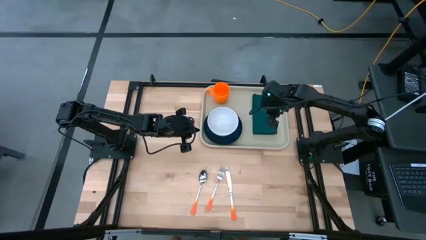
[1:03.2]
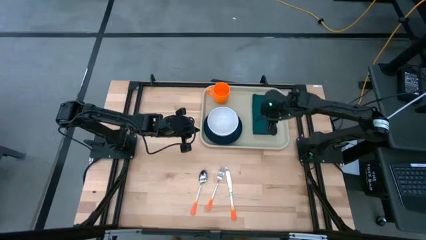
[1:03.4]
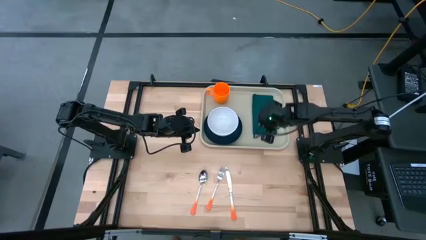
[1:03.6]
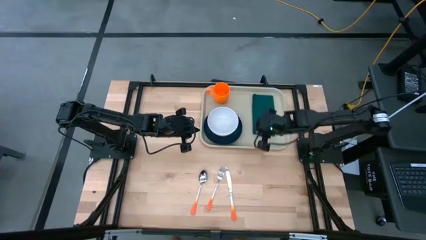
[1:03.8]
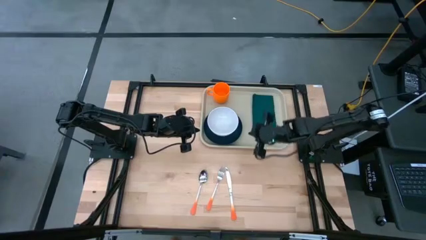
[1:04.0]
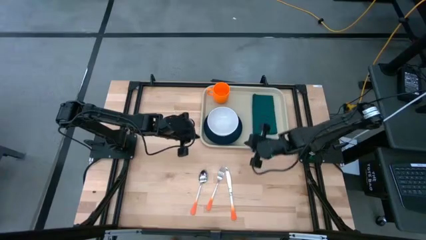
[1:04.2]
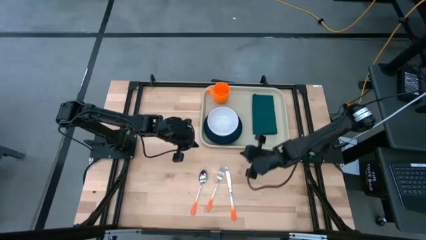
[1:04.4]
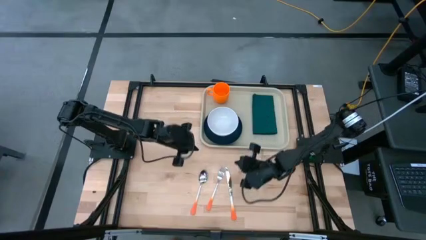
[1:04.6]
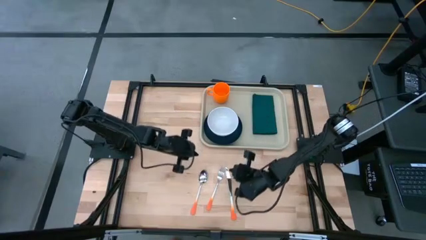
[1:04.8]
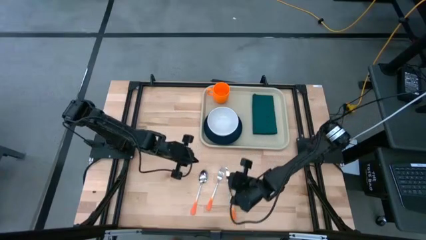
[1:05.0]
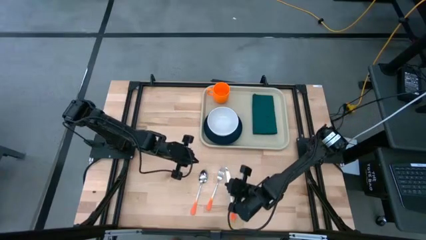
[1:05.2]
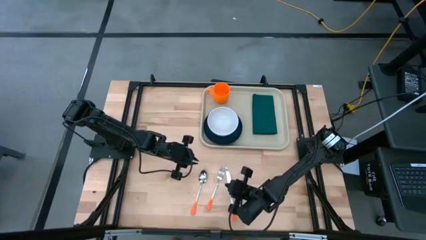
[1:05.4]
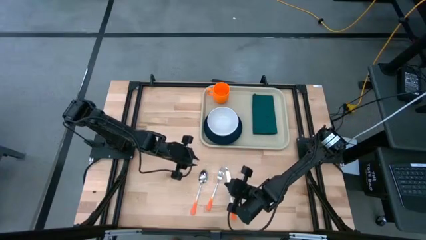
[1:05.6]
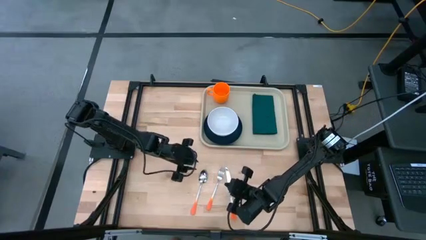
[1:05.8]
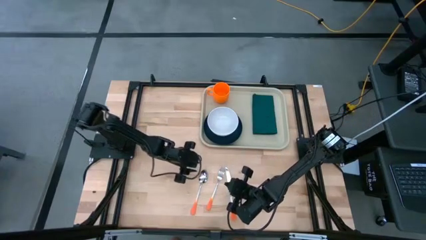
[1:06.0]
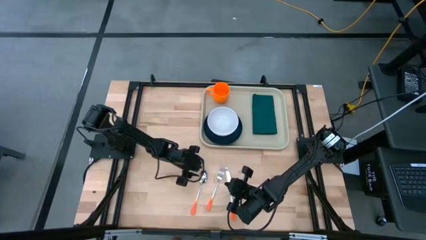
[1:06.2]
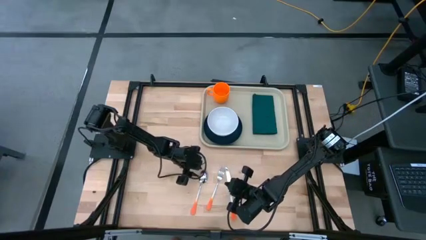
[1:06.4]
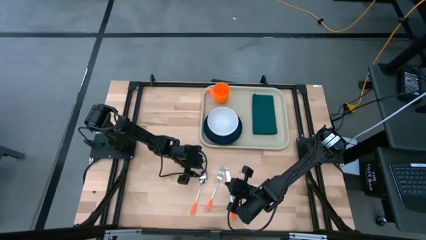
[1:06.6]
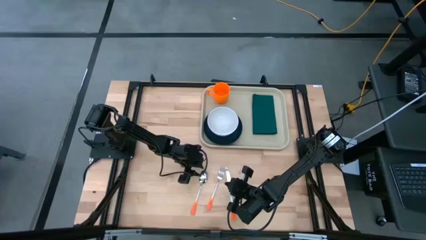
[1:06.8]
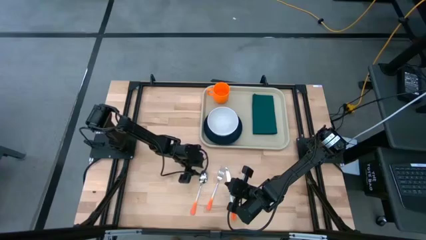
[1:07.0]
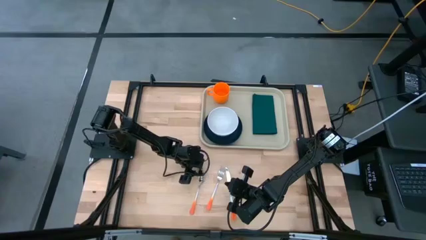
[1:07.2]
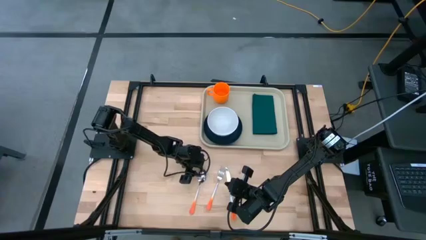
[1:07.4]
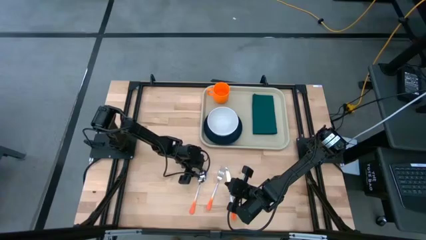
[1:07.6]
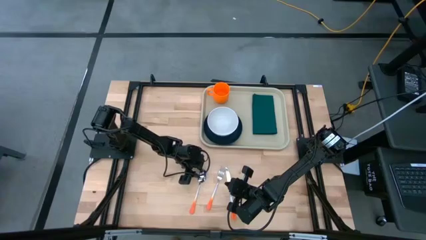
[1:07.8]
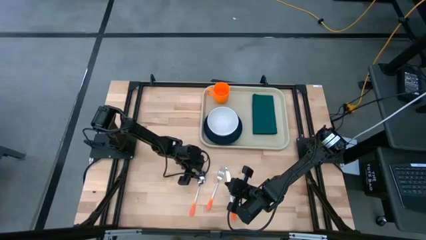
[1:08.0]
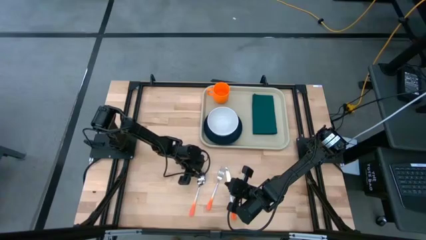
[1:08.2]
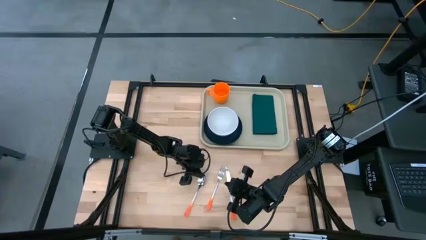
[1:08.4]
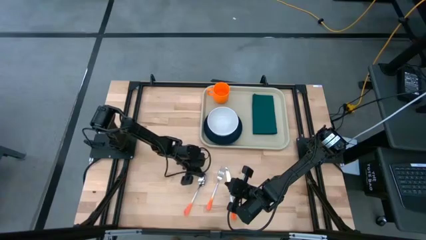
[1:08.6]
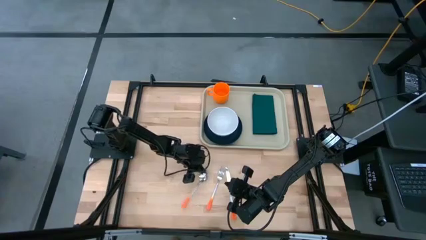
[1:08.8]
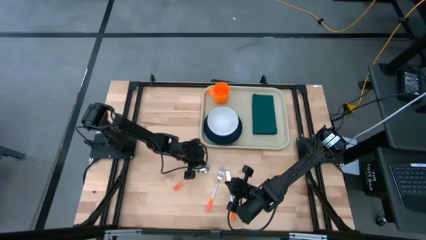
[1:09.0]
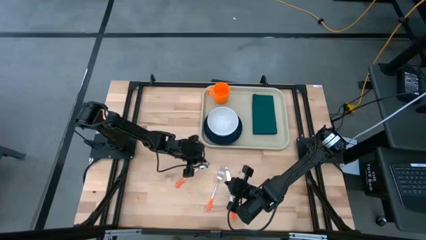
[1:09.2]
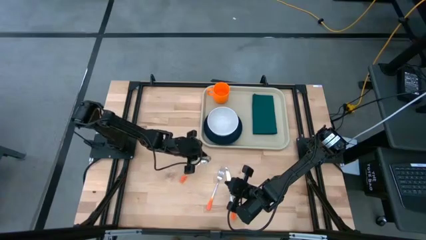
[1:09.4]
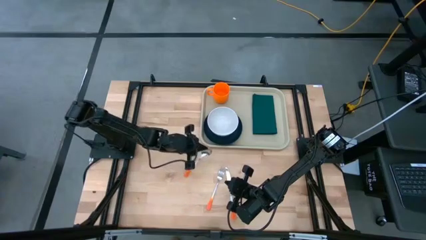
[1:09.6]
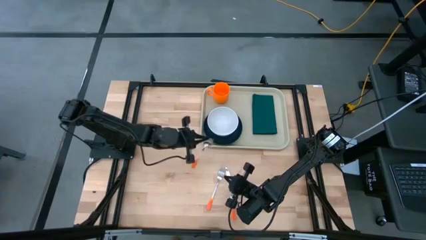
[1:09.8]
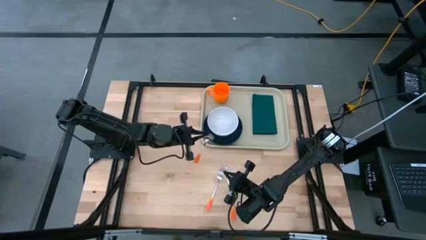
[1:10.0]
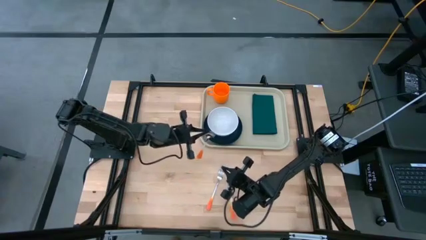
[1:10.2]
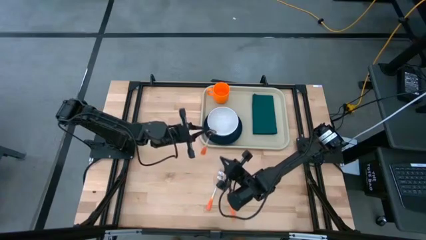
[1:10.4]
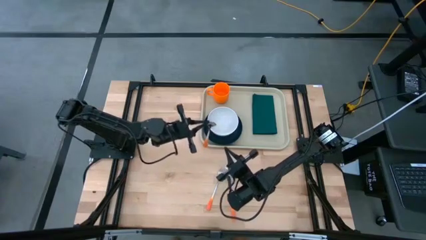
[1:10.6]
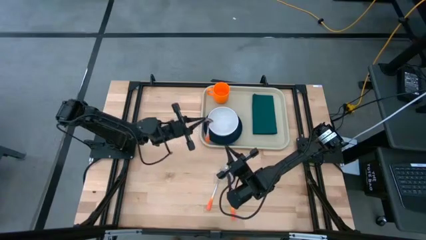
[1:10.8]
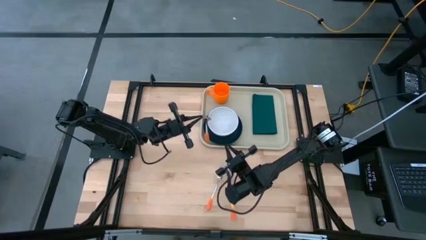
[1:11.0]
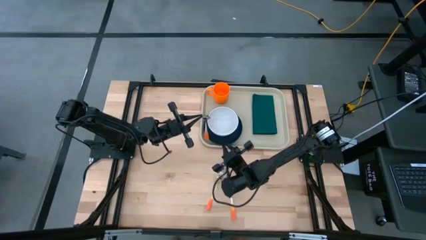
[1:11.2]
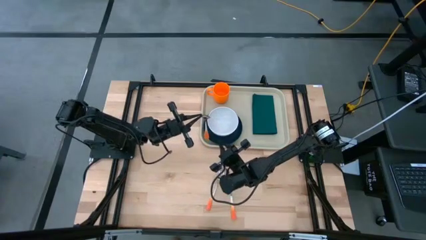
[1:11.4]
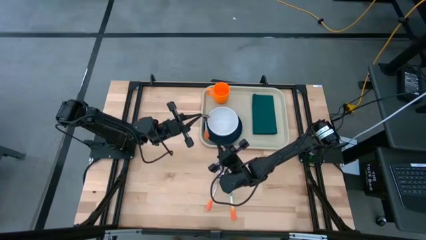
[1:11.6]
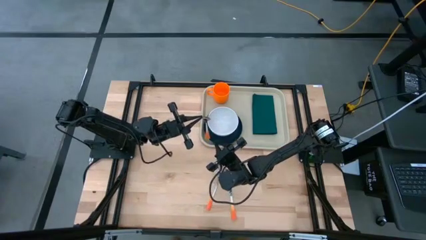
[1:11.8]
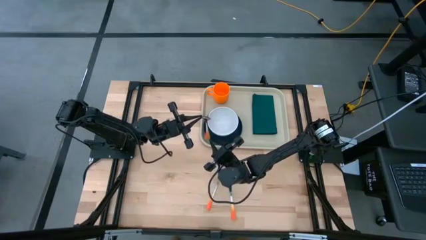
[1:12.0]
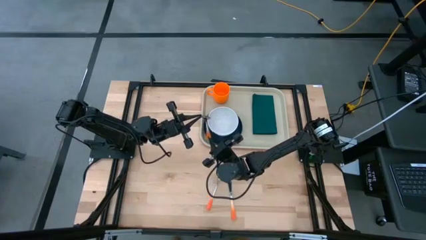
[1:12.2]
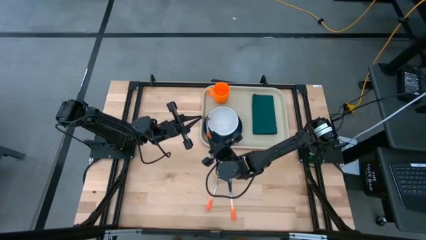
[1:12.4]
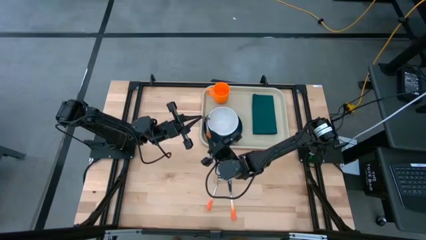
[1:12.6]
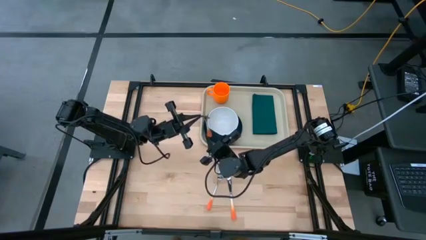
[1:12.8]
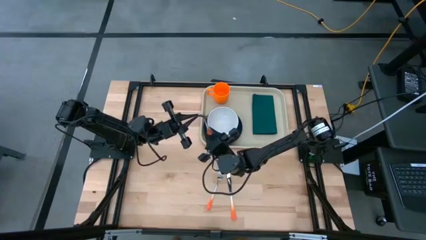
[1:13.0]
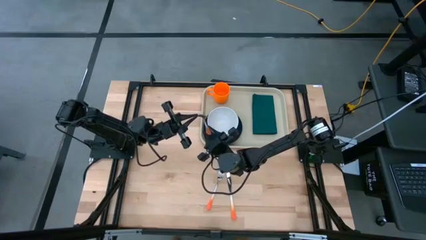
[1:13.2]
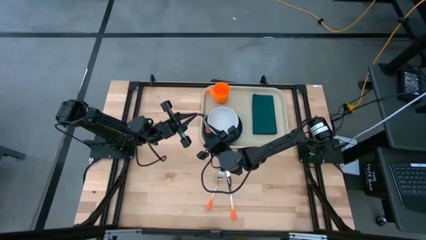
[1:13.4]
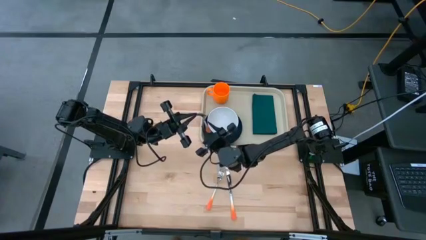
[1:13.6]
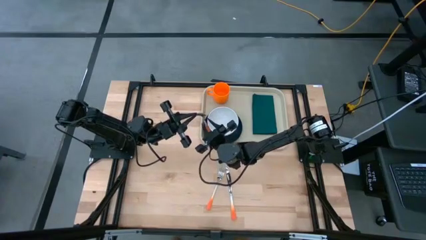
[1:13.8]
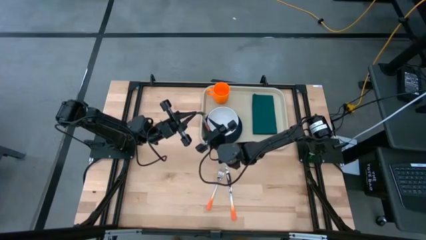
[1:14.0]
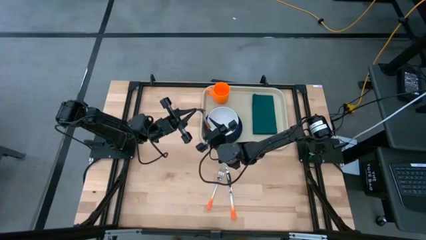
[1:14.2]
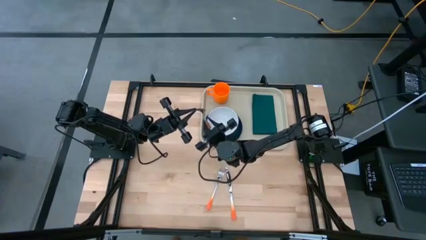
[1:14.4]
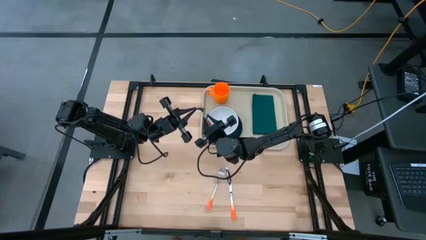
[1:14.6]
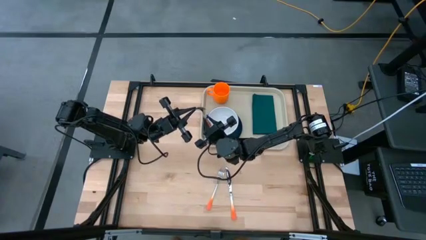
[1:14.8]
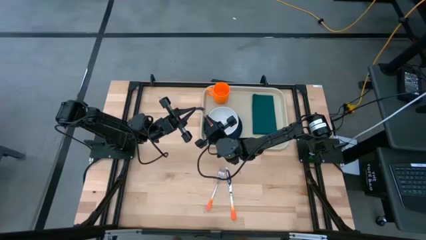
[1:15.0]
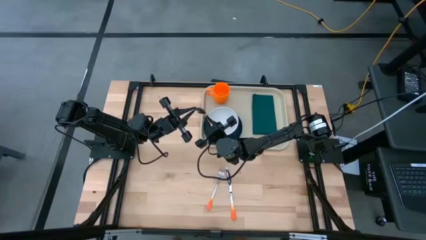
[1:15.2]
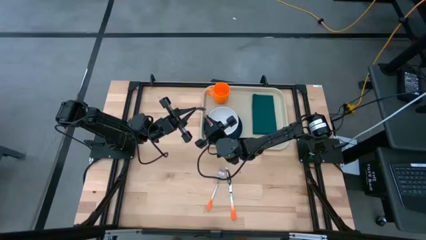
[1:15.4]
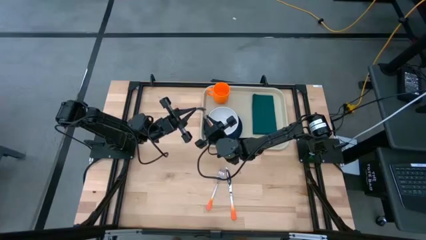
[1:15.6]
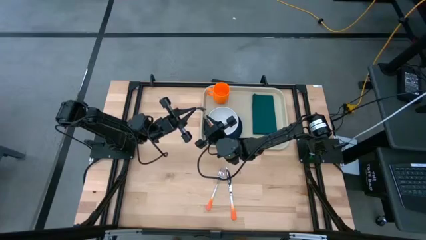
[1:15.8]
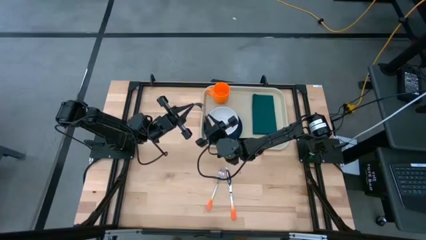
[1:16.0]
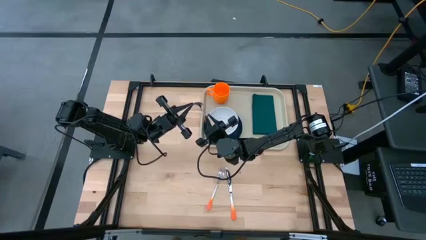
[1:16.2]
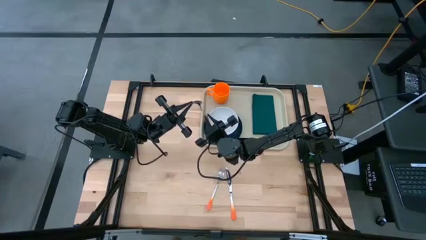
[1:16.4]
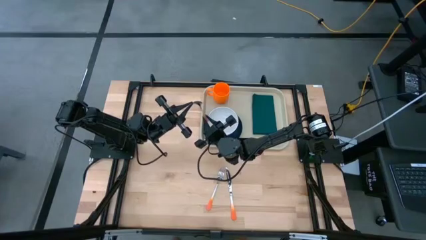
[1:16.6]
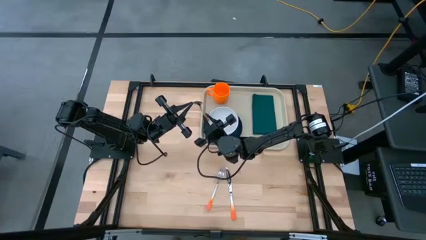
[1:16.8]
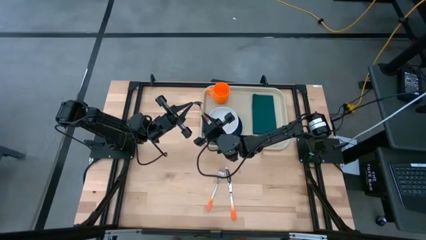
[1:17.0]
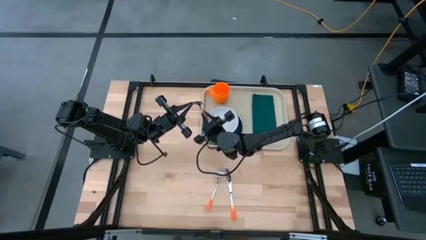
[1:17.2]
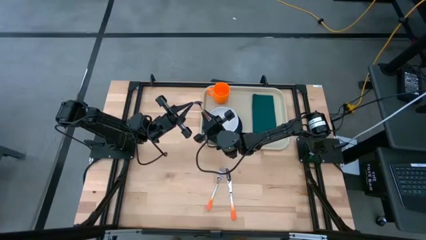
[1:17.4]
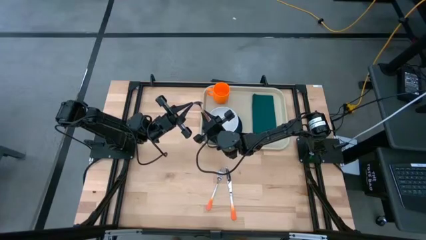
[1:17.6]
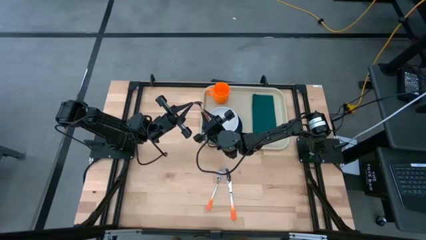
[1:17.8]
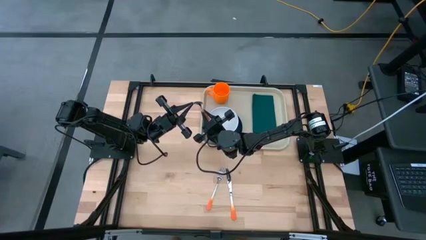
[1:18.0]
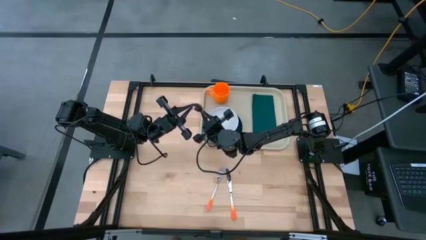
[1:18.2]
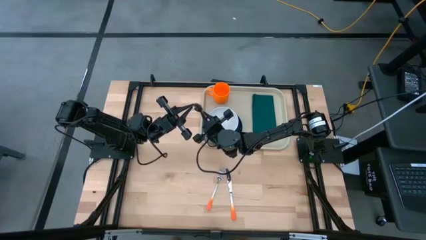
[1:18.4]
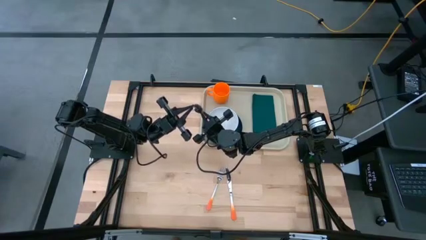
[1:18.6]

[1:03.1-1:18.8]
Task: Set up tray
Put the orange spoon on the blue napkin on the serving tray

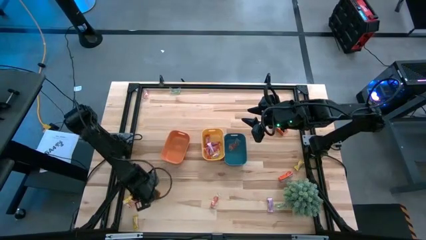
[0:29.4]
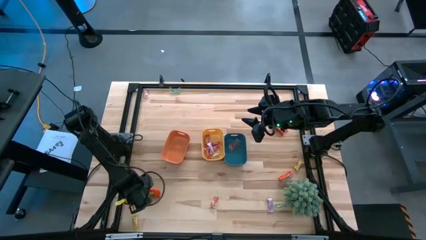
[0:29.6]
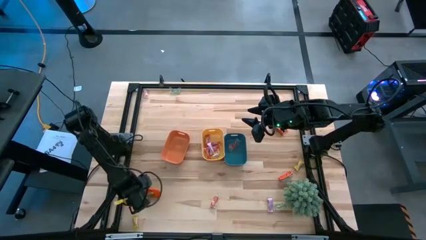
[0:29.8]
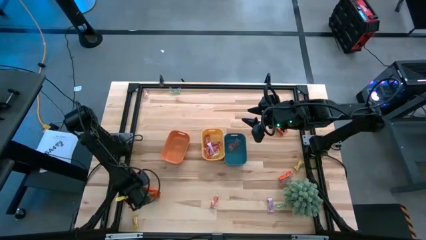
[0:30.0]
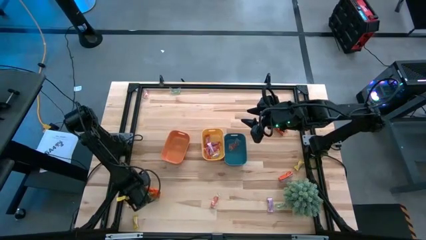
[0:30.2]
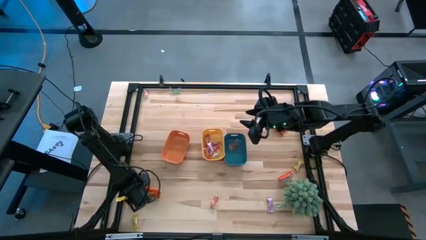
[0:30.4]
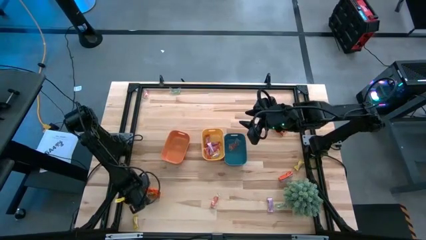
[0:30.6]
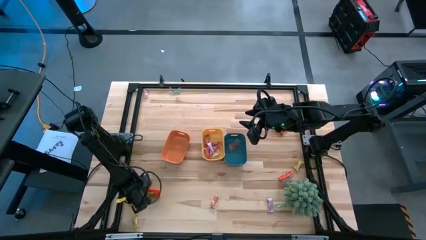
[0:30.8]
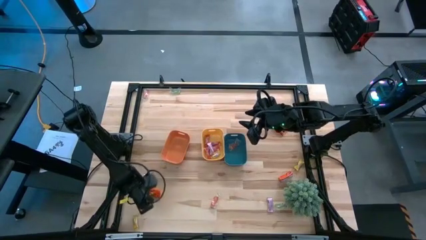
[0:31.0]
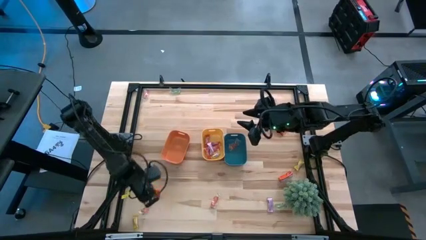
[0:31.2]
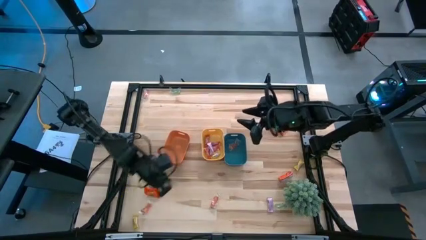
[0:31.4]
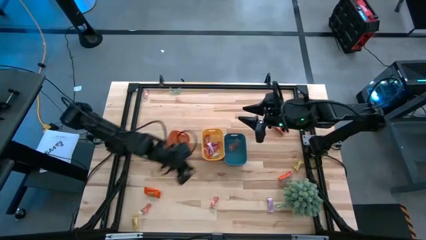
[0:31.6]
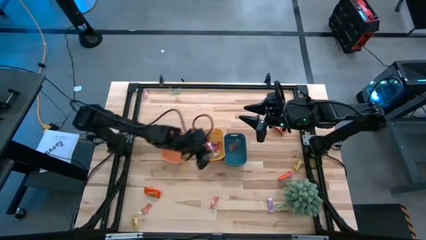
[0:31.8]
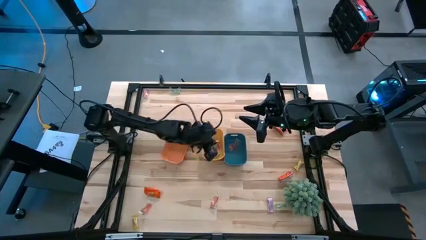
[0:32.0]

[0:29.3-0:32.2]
Task: Sort candy
Put the yellow candy into the yellow bin
